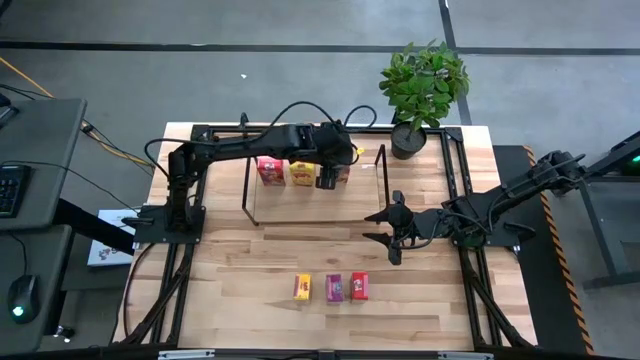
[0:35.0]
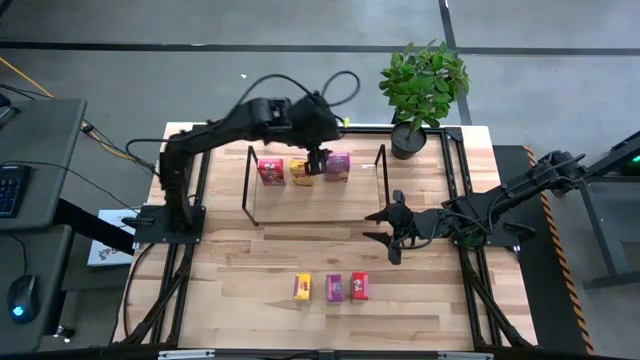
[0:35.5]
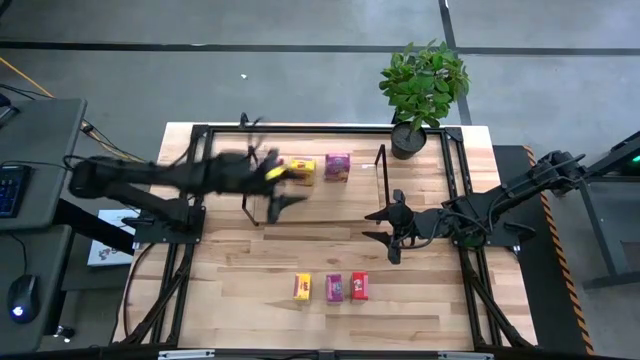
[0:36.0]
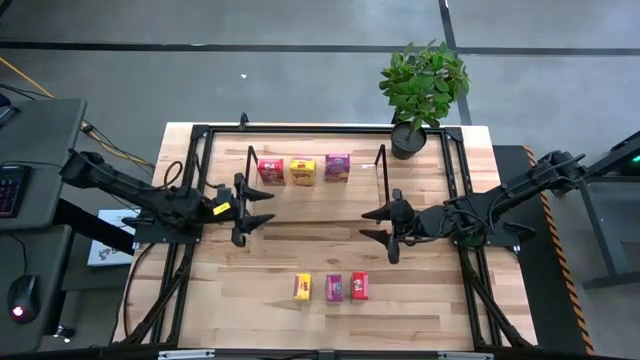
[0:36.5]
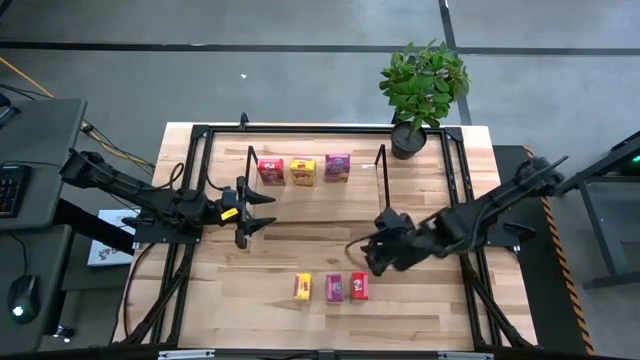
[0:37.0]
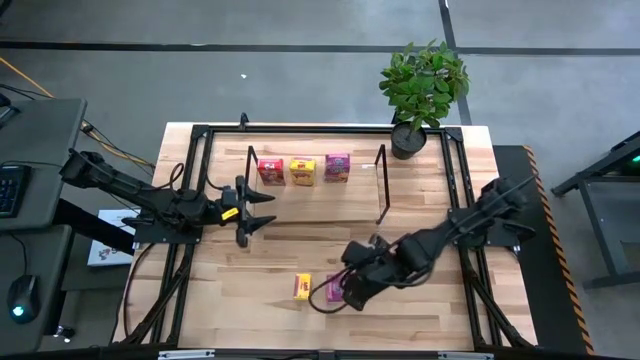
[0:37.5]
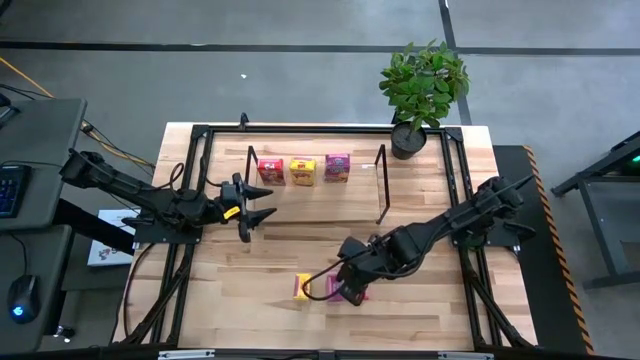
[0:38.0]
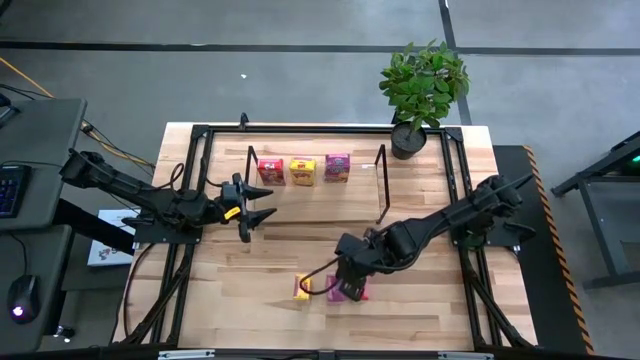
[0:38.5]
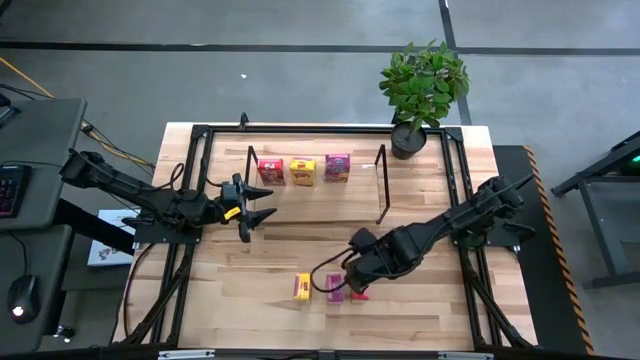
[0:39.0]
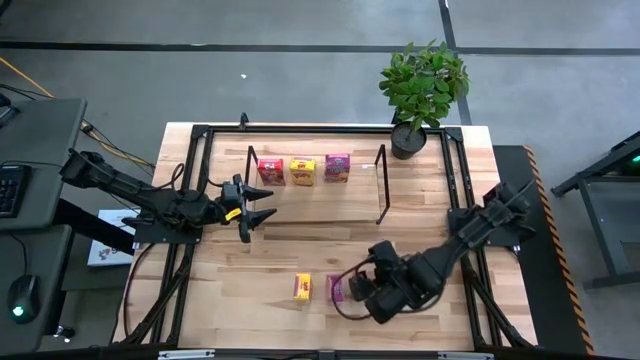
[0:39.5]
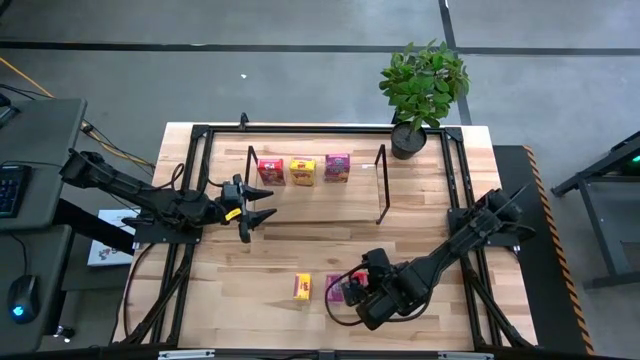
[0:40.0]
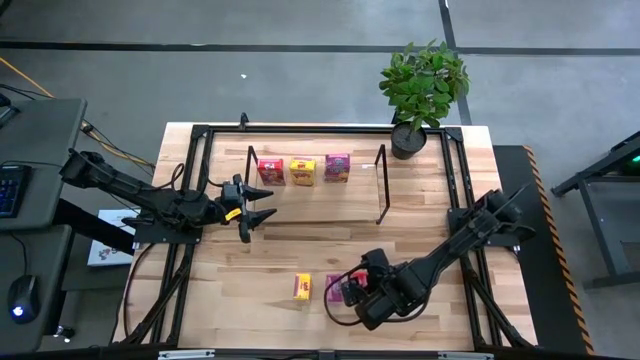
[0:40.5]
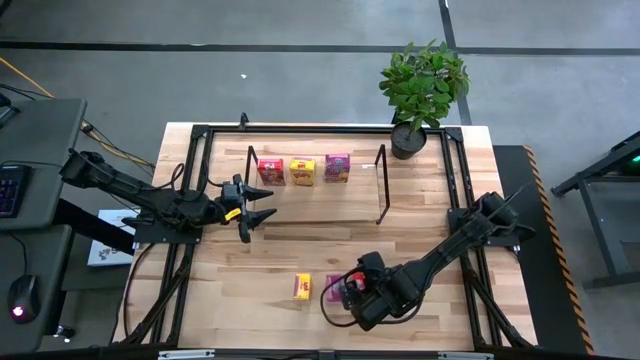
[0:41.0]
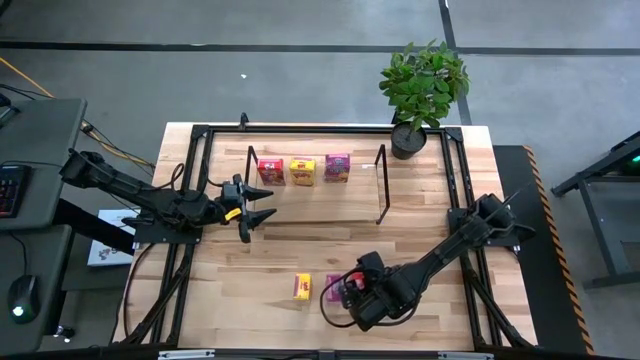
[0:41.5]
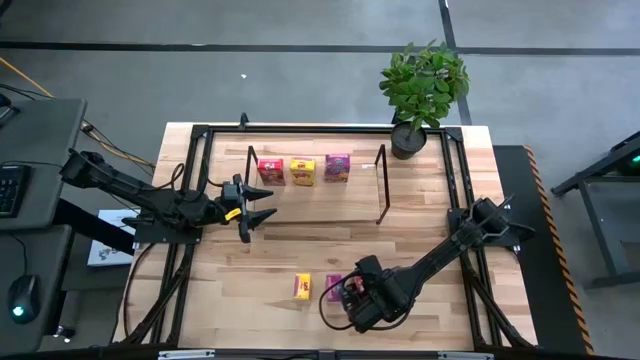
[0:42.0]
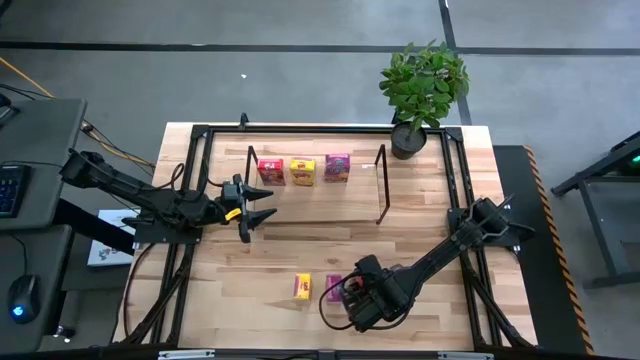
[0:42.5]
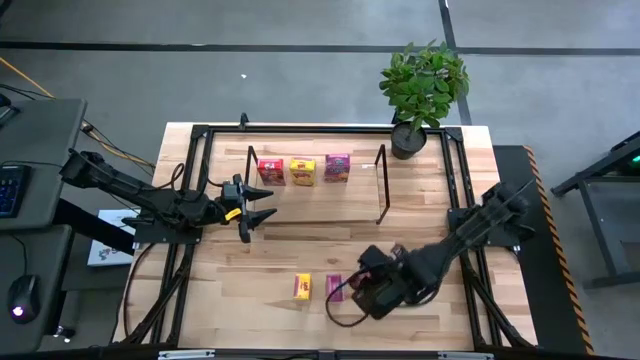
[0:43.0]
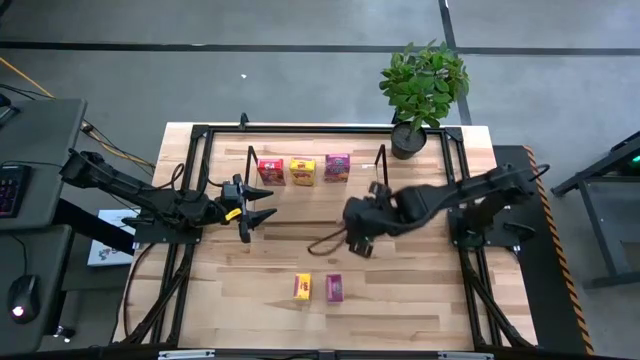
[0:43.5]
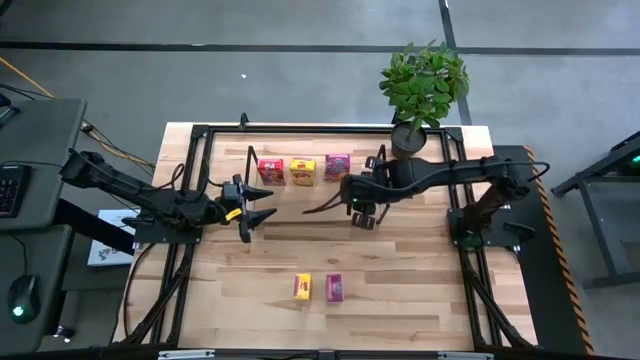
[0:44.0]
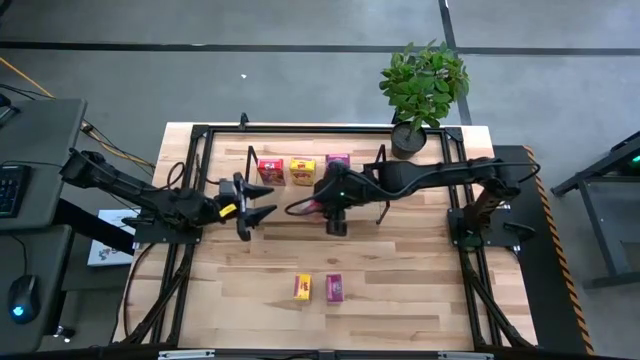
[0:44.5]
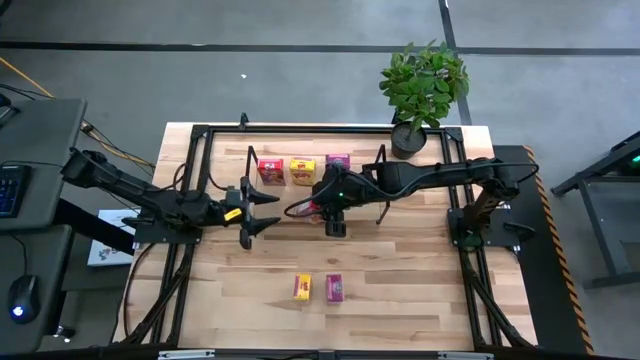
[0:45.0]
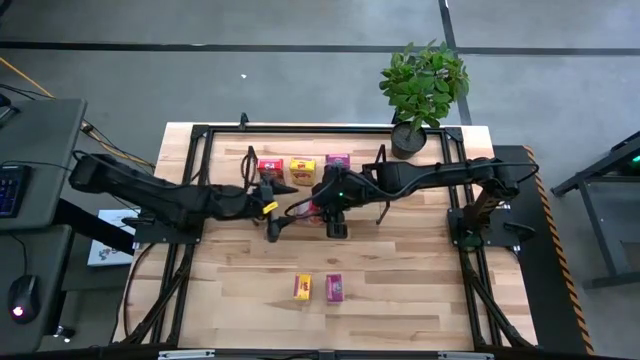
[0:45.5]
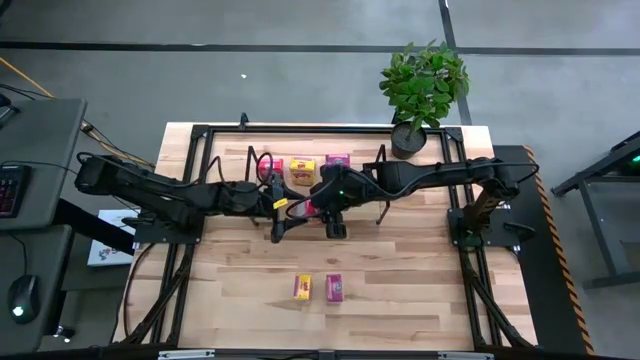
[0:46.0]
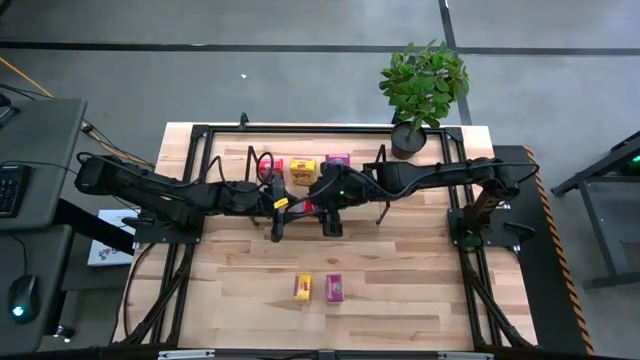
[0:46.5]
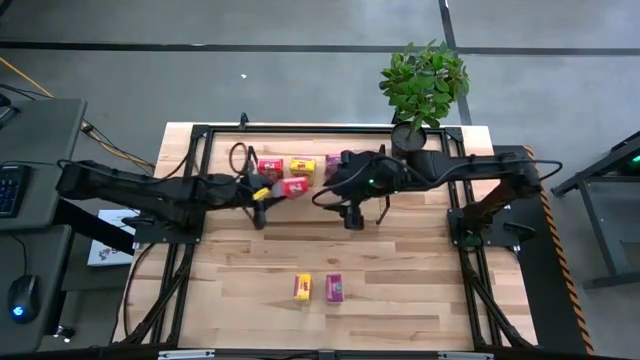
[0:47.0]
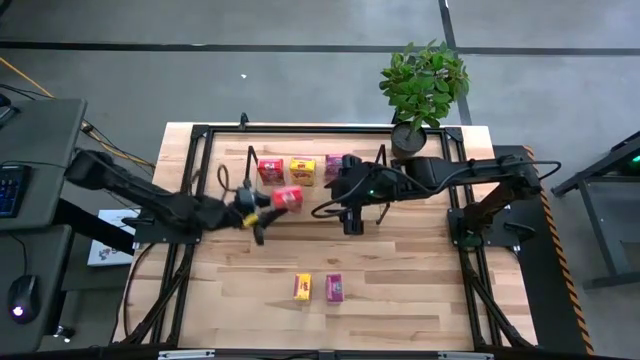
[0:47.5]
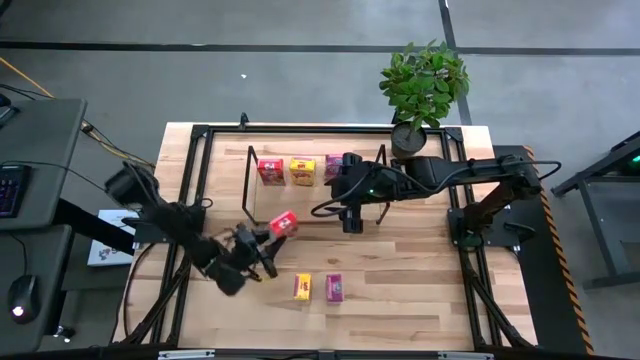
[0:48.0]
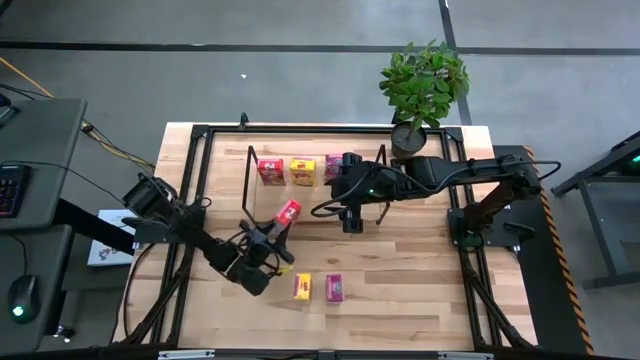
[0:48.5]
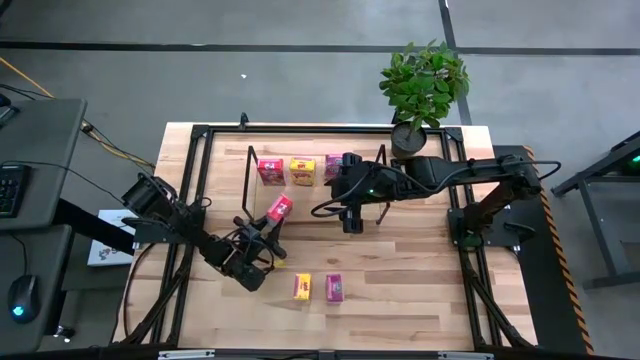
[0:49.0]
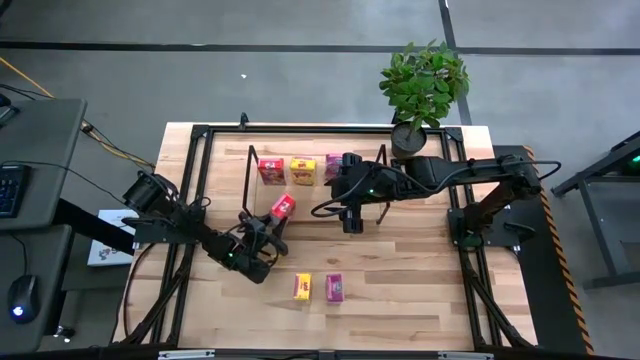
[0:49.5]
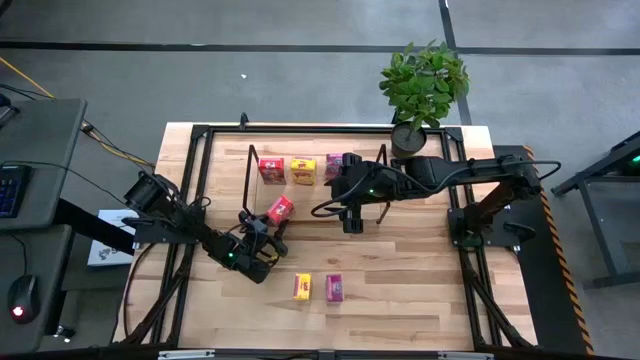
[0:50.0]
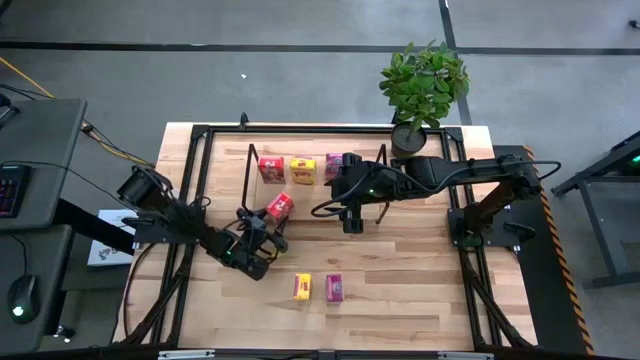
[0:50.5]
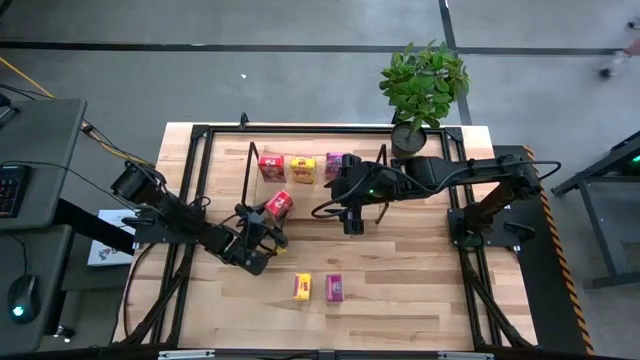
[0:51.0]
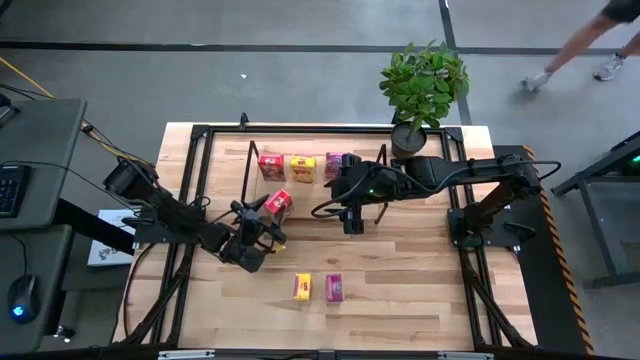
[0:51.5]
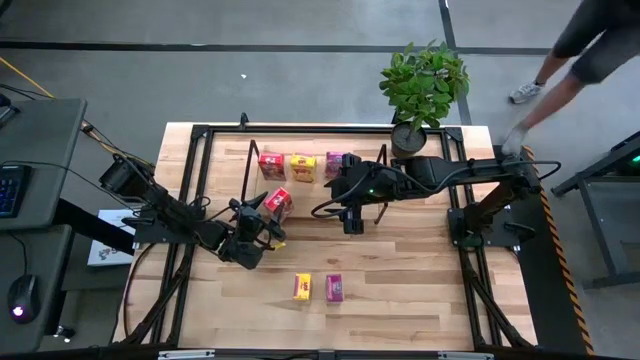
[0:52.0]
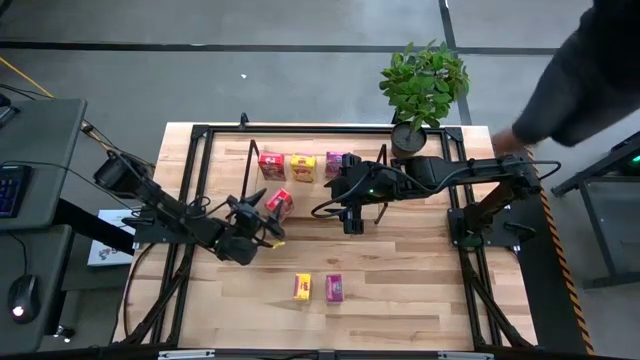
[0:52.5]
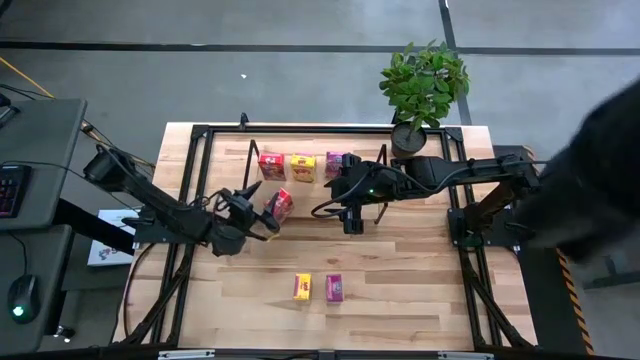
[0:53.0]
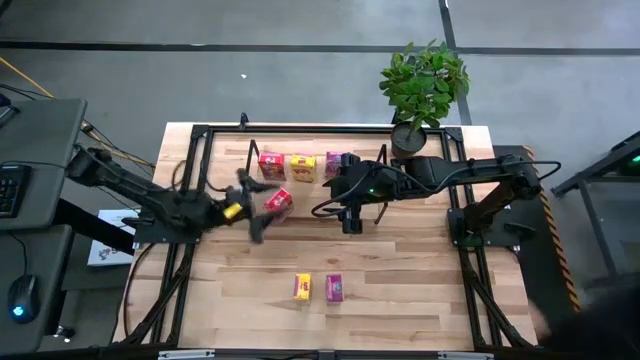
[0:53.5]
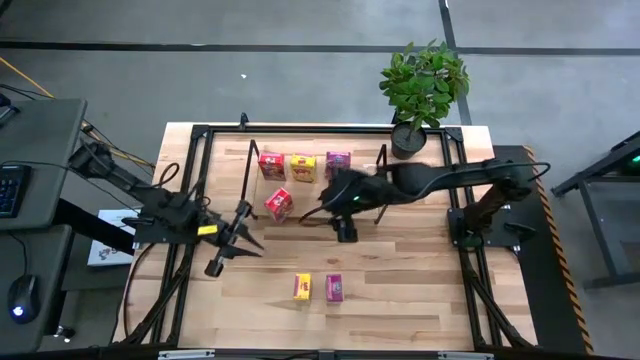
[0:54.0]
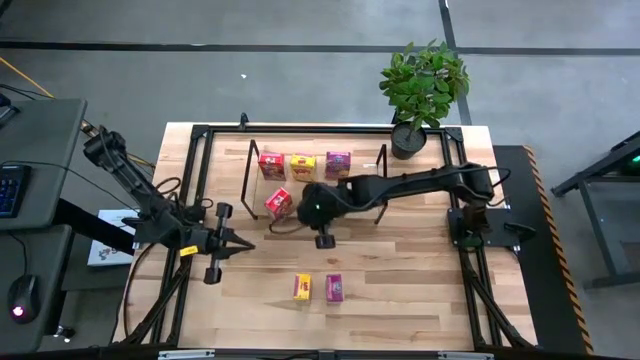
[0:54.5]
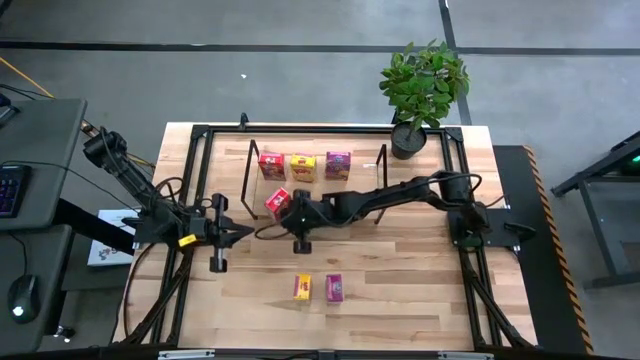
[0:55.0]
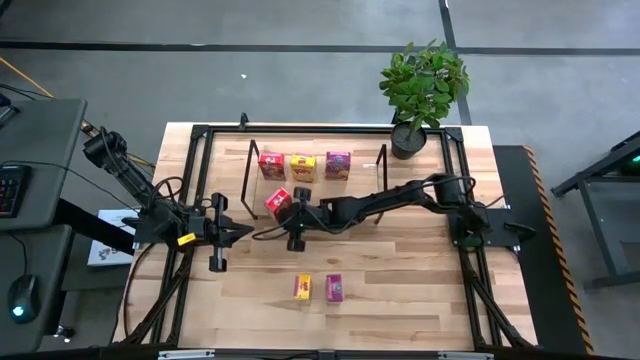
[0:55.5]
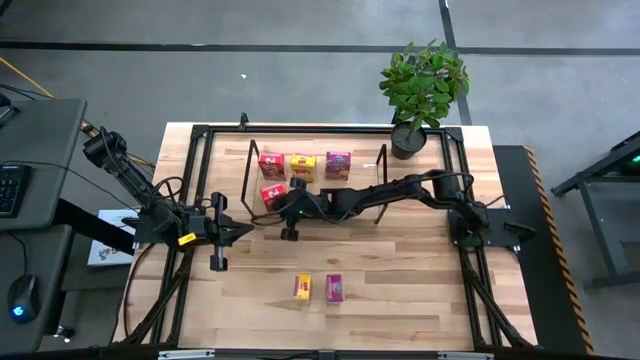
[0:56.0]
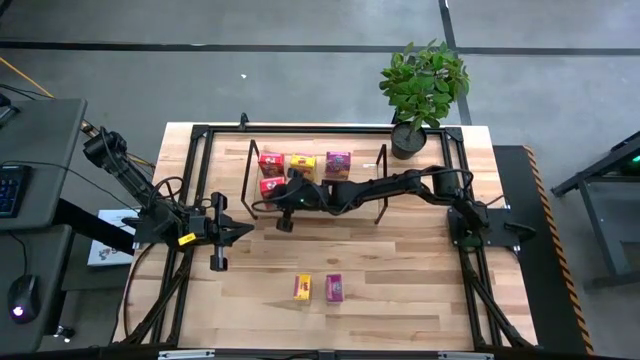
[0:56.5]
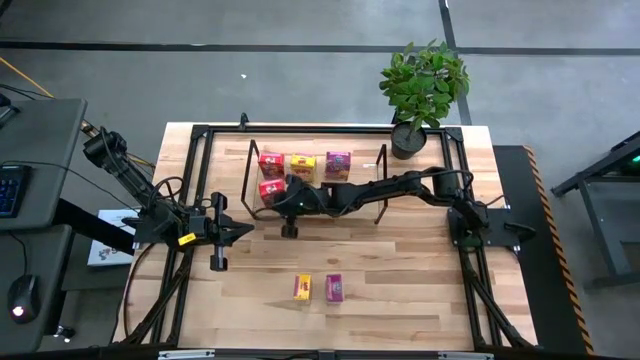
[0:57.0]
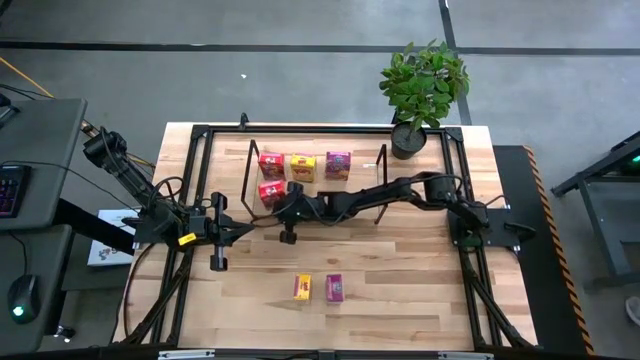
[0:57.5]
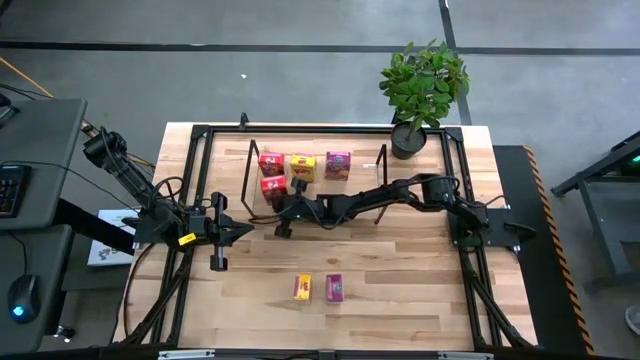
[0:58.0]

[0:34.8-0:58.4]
Task: Stack cereal on shelf
Put the red cereal box on the shelf aligned with the other red cereal box
